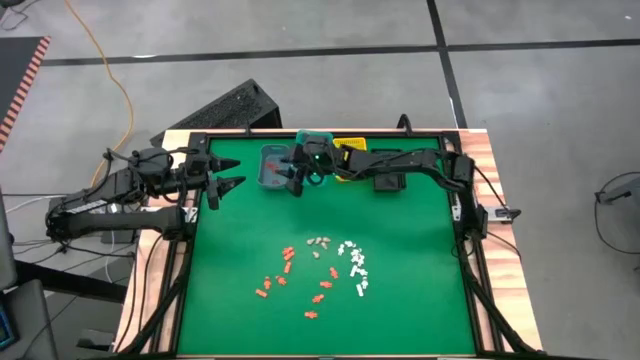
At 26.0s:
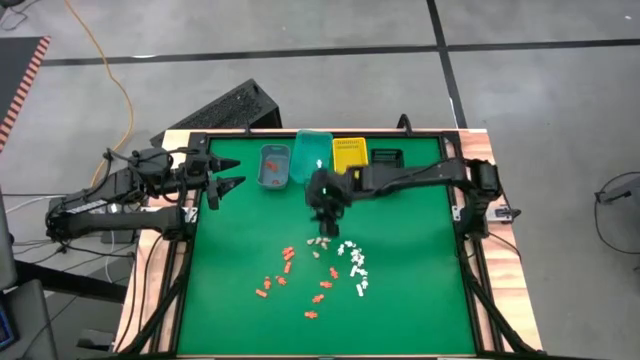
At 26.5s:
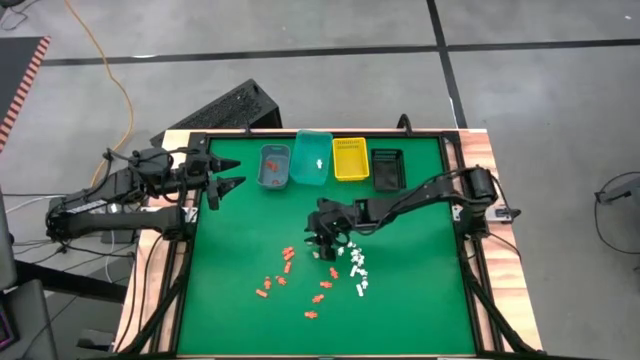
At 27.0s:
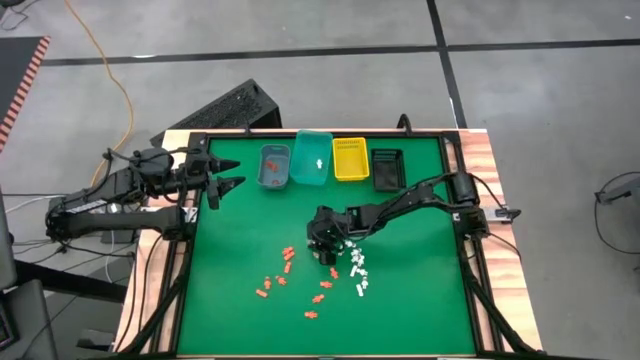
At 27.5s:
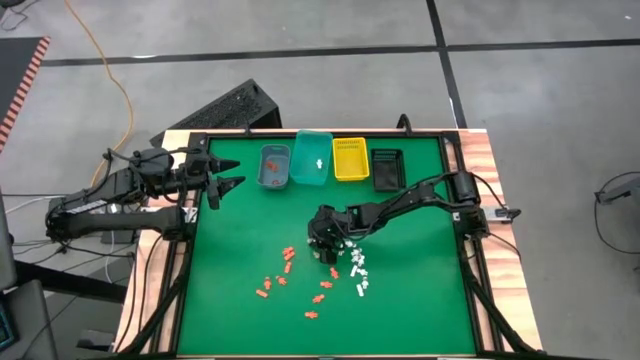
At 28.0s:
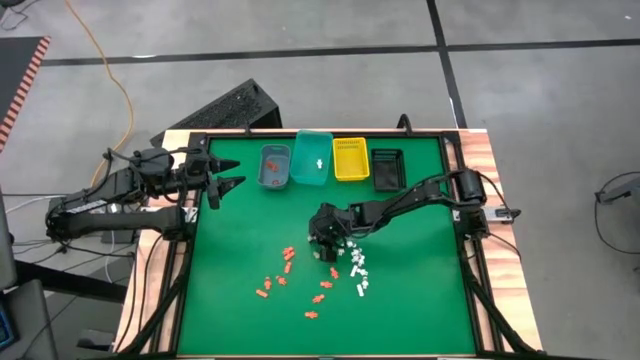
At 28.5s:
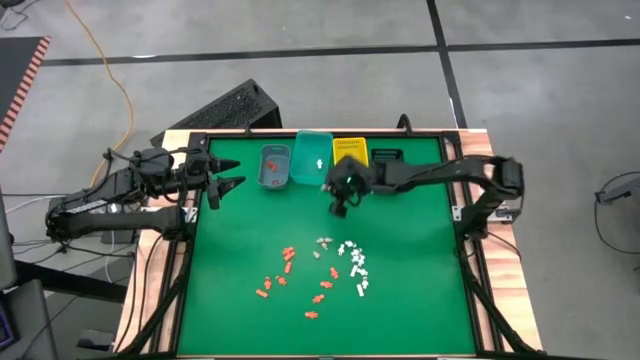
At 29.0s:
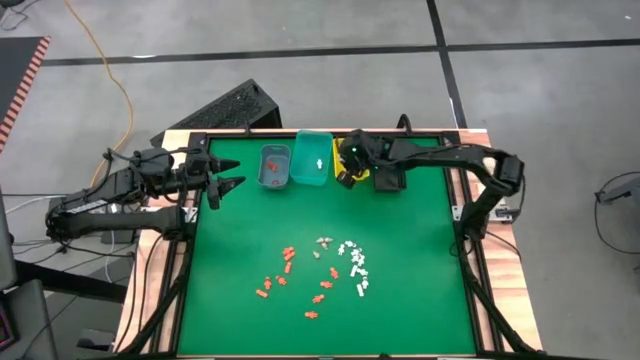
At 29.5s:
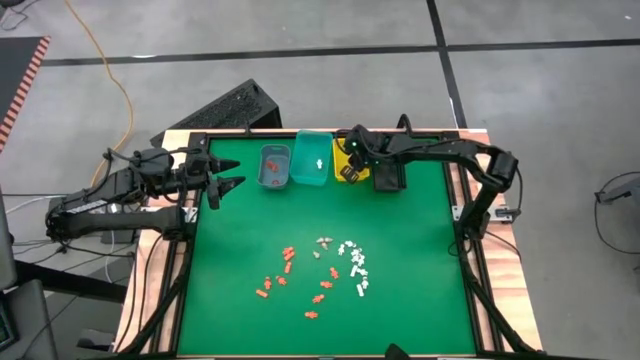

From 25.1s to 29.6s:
Task: Sort Halloween decoration
Put the white skull toy into the yellow bin

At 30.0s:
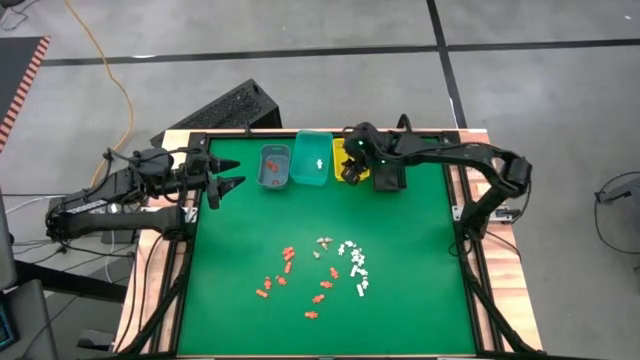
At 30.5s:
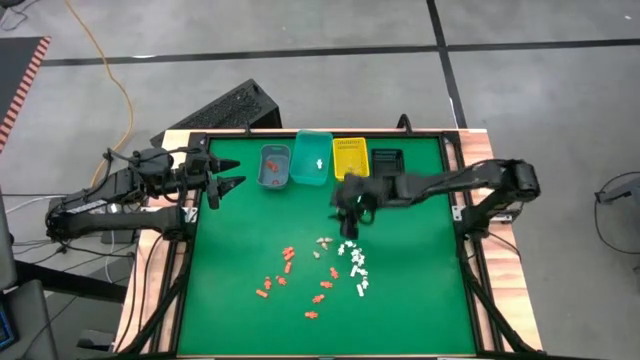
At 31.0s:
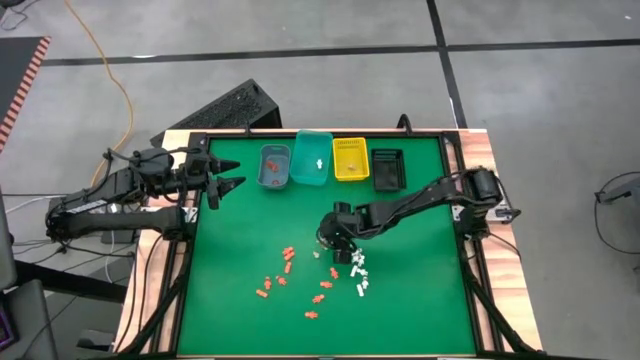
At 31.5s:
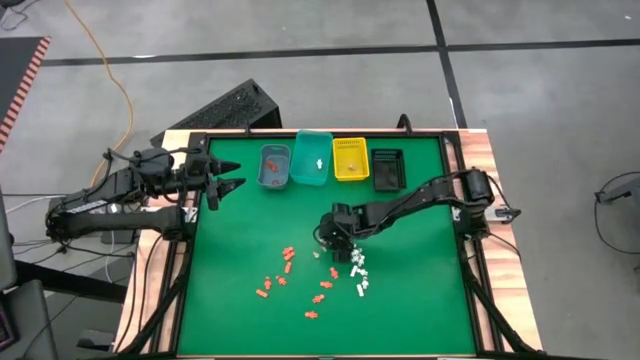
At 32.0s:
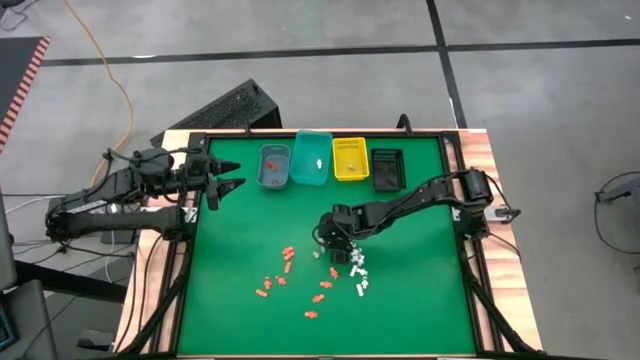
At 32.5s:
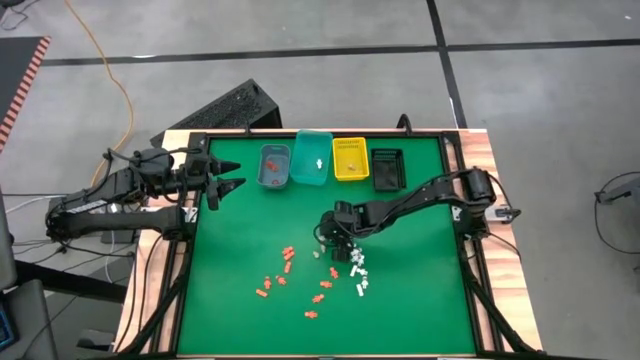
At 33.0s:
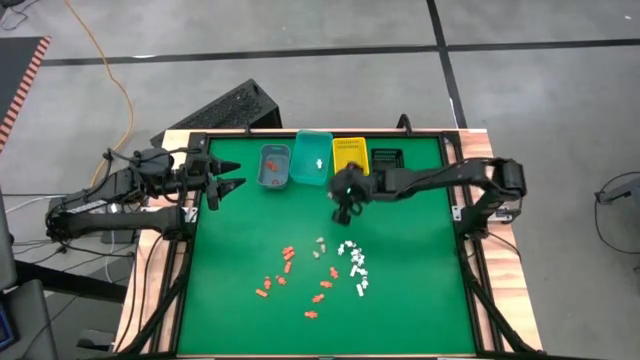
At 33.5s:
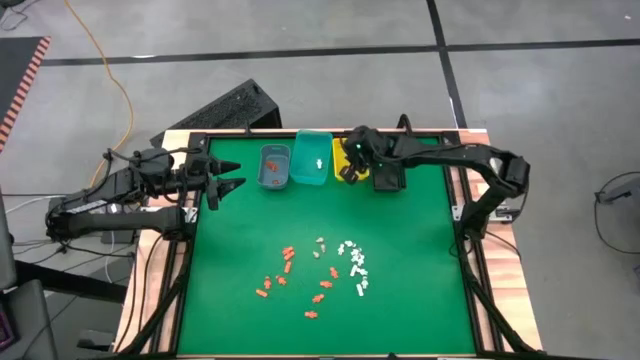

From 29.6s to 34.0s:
Put the white skull toy into the yellow bin

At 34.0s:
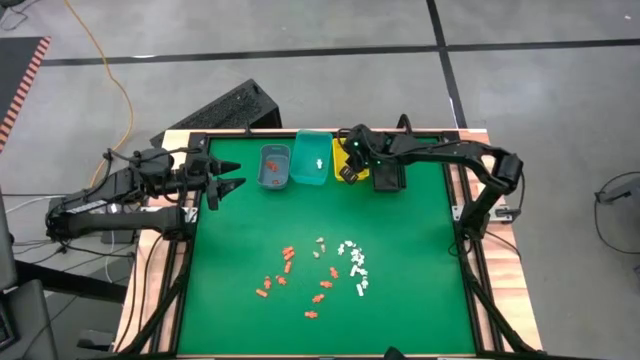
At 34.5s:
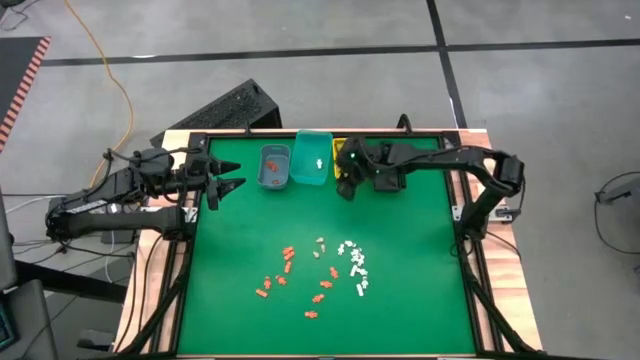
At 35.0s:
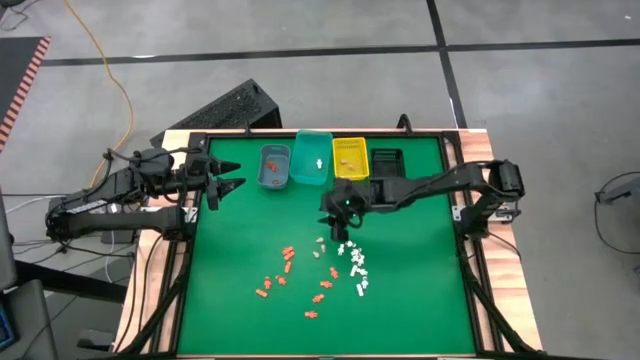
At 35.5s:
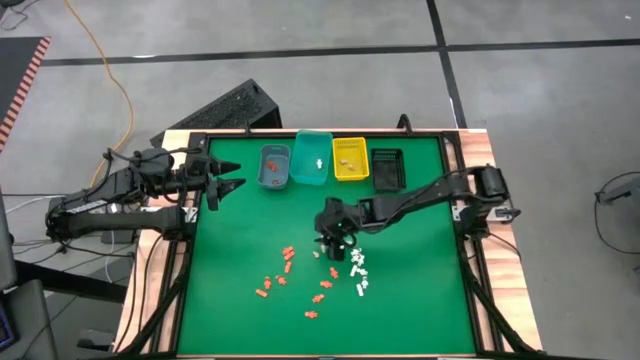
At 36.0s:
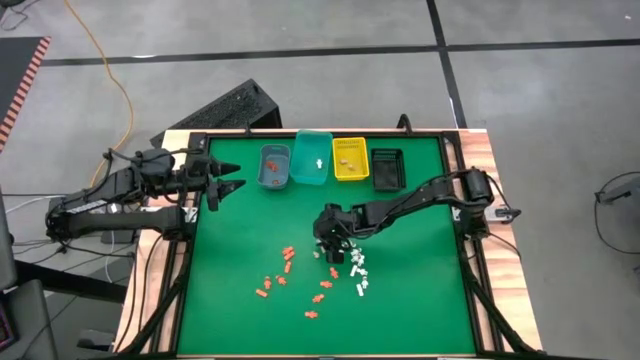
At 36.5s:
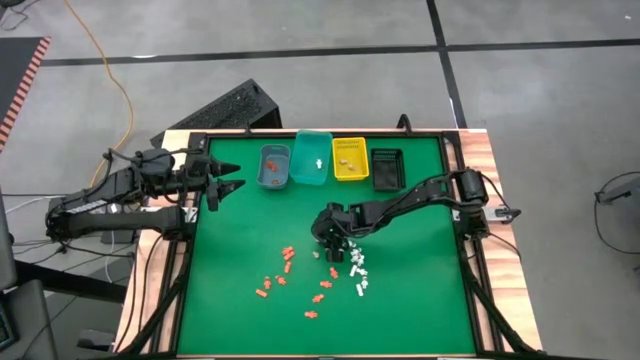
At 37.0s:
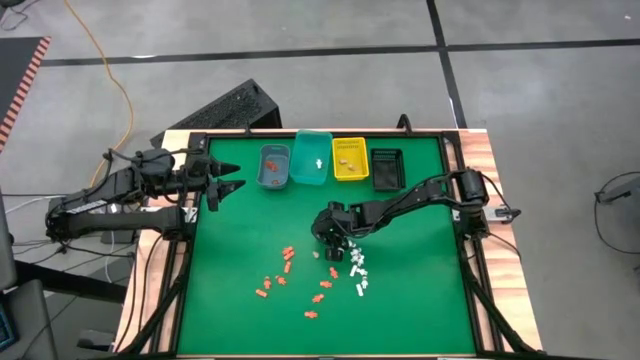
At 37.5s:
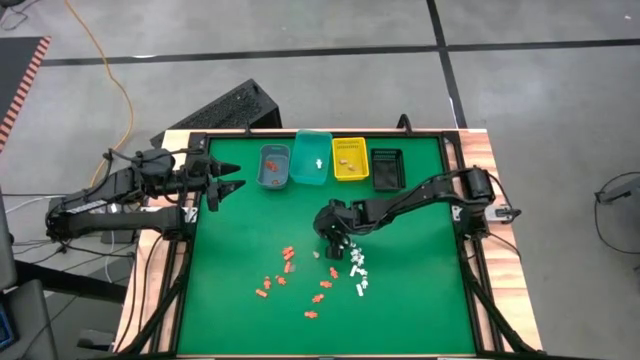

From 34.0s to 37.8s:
Put the white skull toy into the yellow bin

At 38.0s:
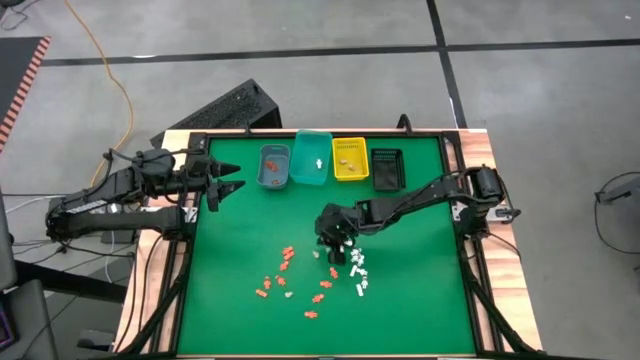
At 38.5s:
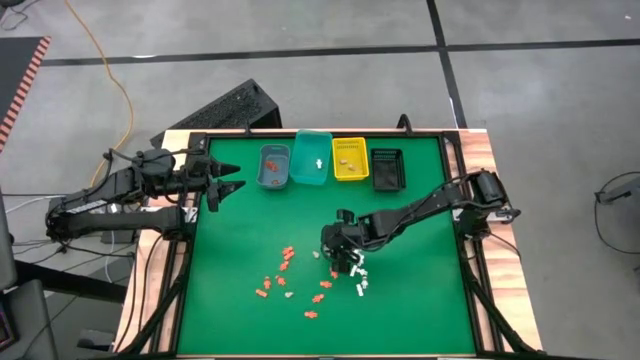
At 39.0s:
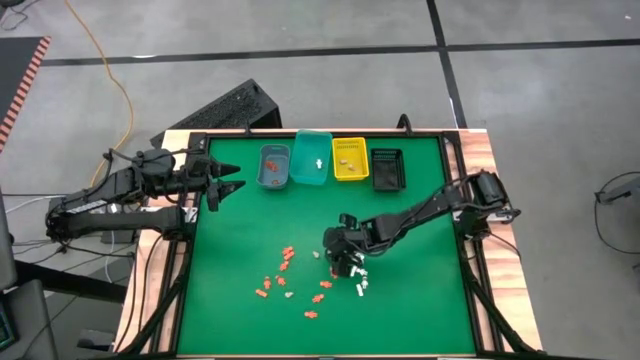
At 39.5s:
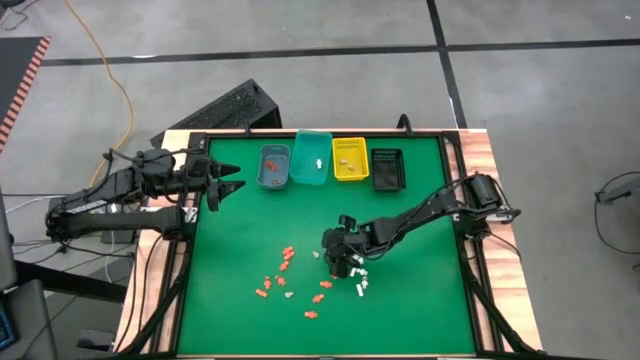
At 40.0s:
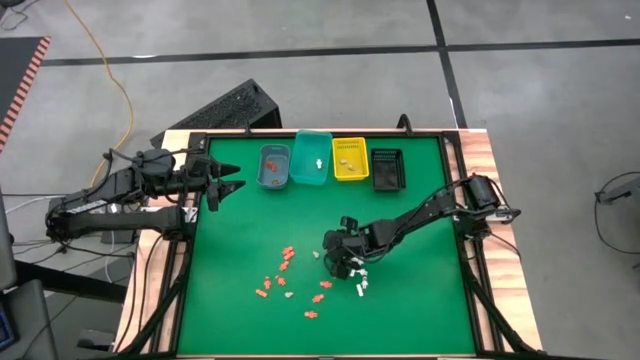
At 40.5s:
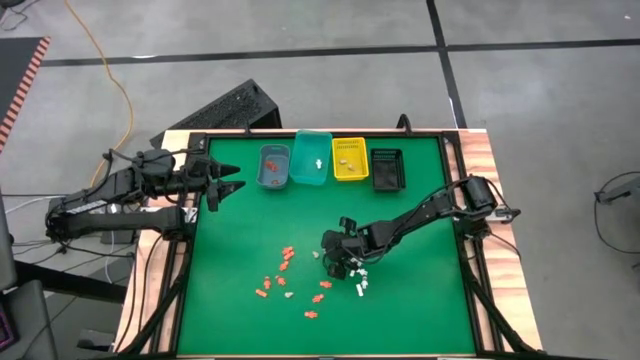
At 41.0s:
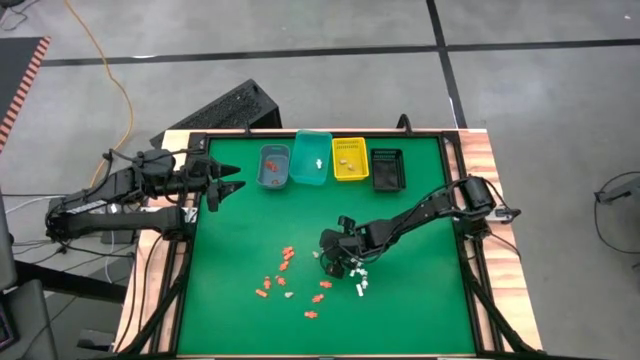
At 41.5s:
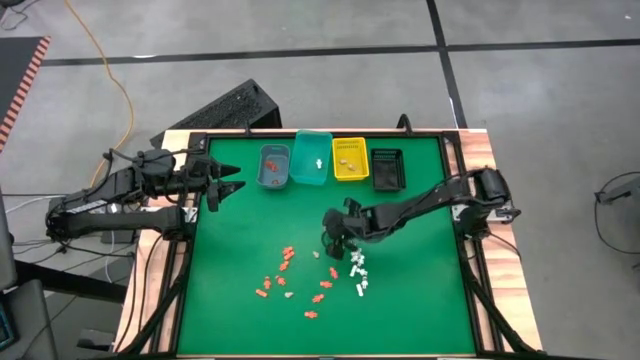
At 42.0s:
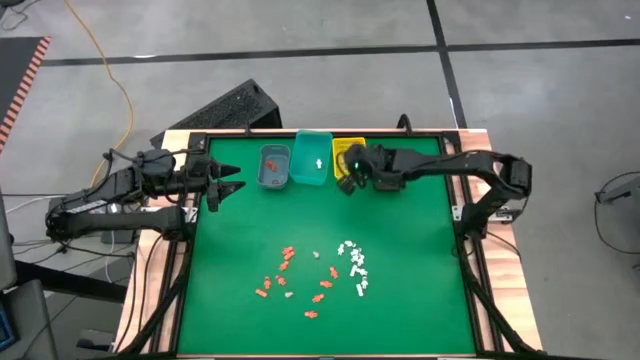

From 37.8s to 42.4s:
Put the white skull toy into the yellow bin

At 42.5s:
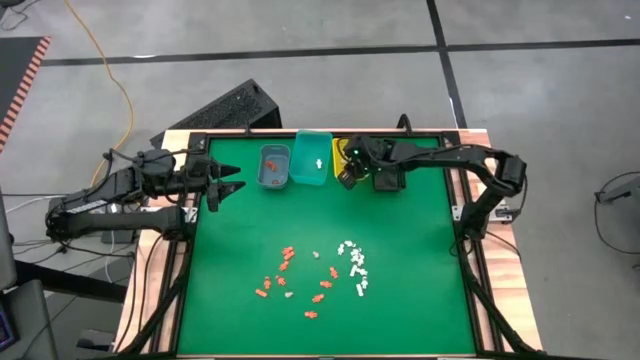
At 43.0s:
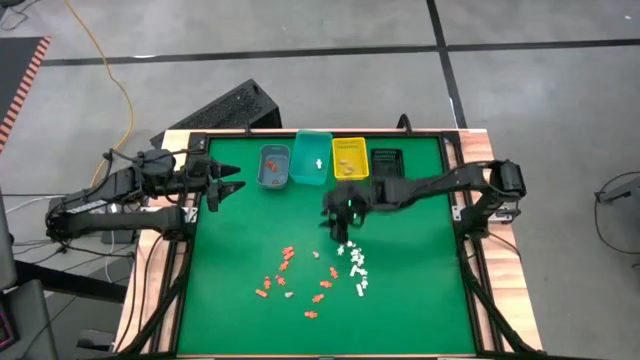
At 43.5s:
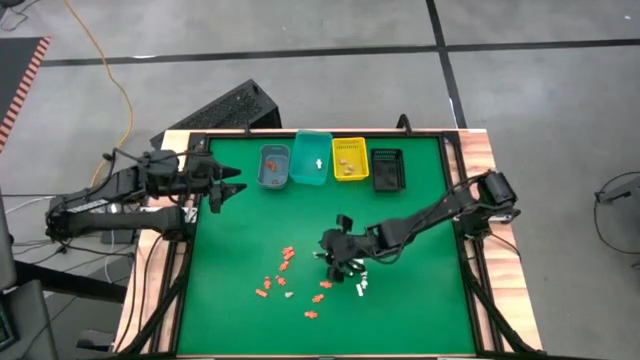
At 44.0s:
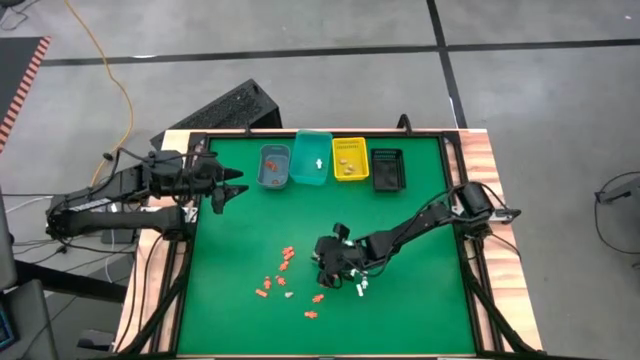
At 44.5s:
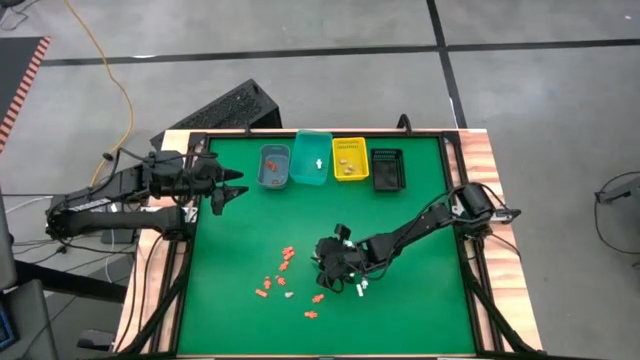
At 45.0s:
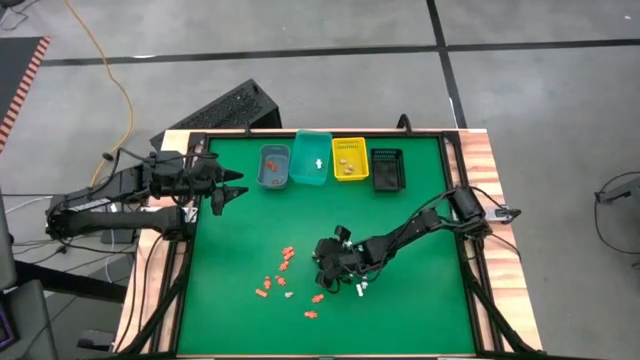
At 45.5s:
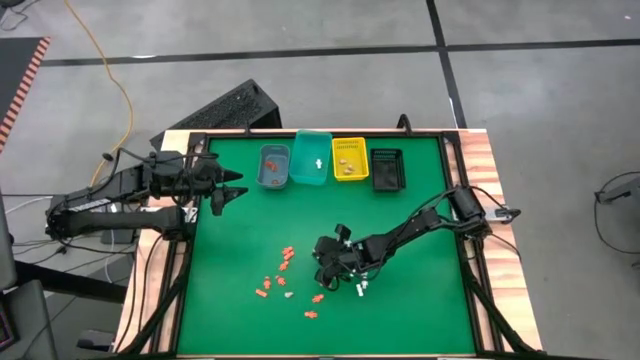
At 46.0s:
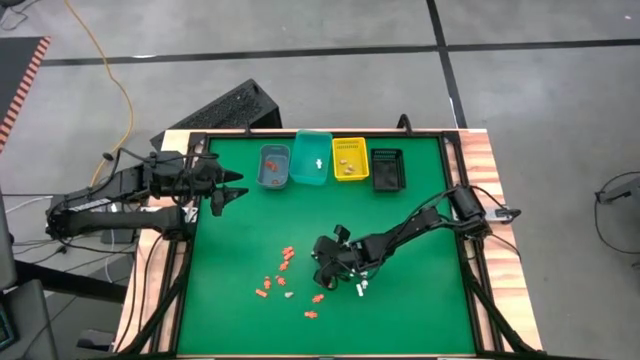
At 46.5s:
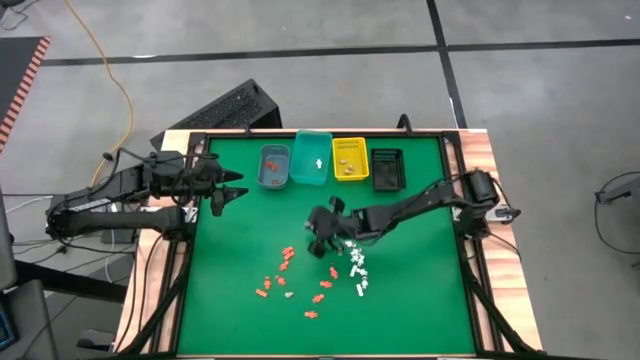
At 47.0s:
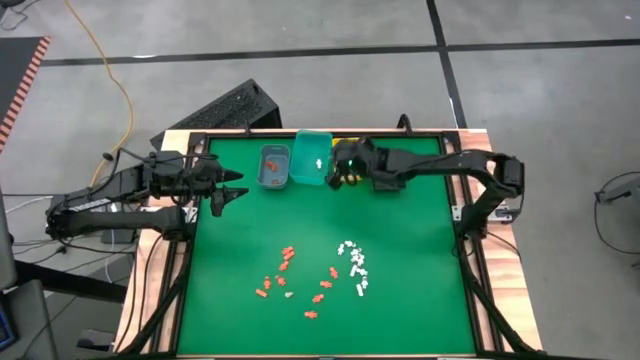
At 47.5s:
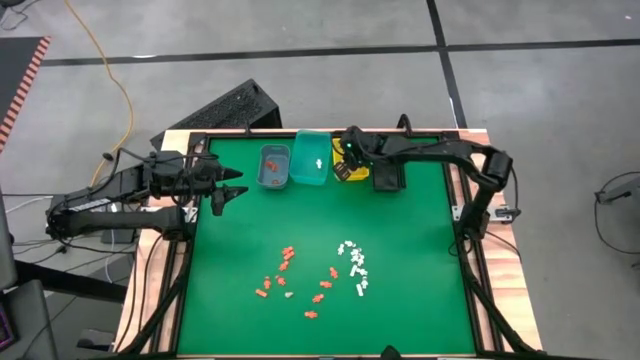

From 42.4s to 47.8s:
Put the white skull toy into the yellow bin
